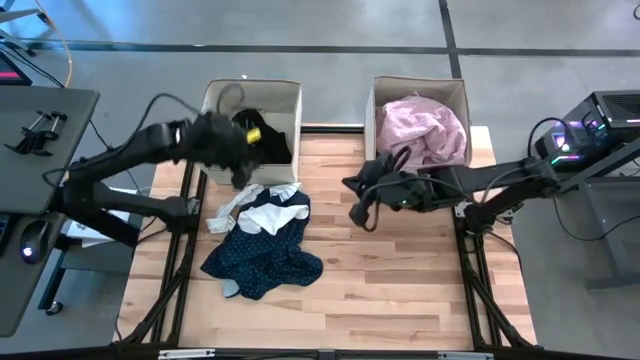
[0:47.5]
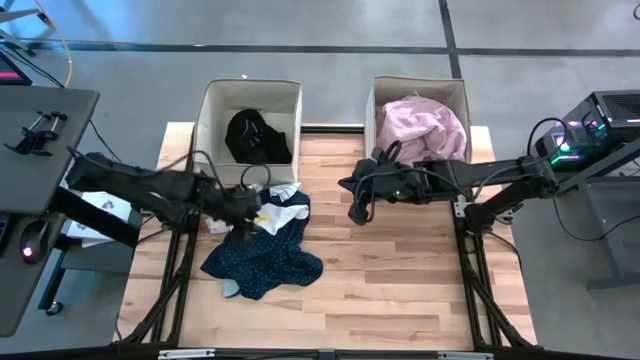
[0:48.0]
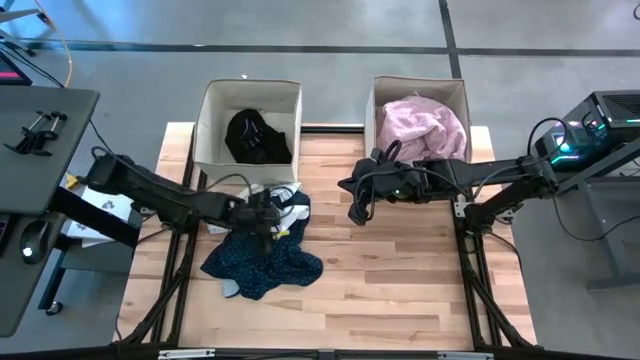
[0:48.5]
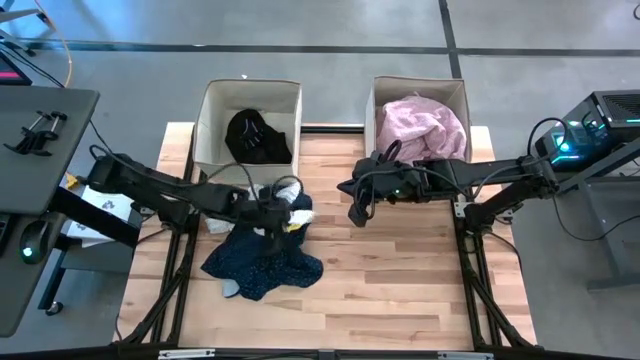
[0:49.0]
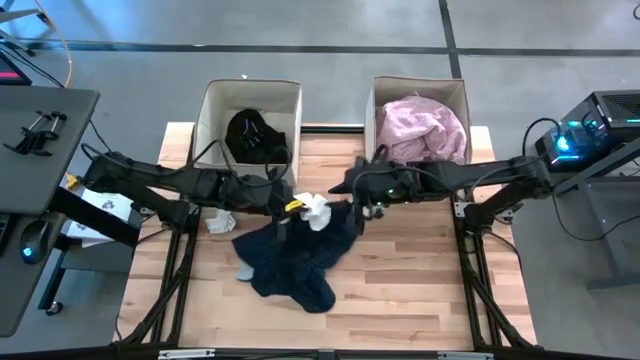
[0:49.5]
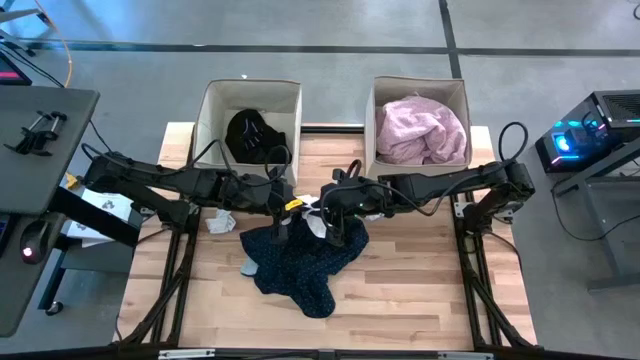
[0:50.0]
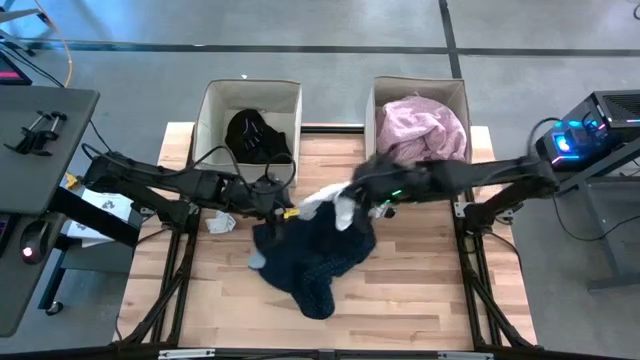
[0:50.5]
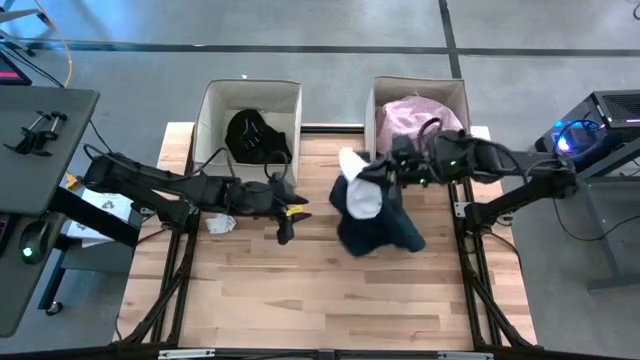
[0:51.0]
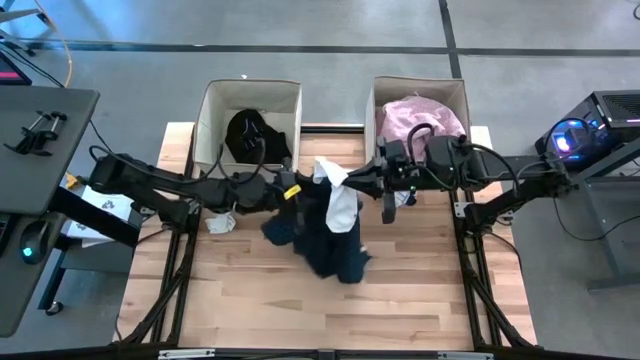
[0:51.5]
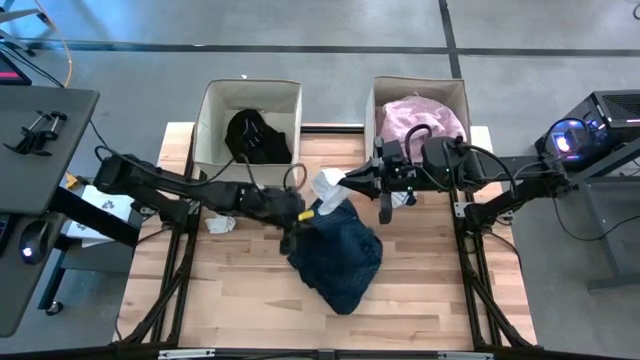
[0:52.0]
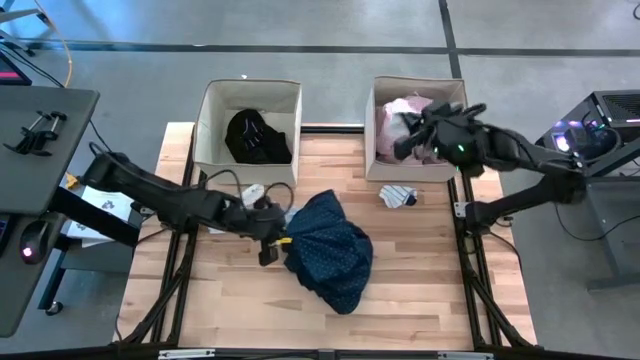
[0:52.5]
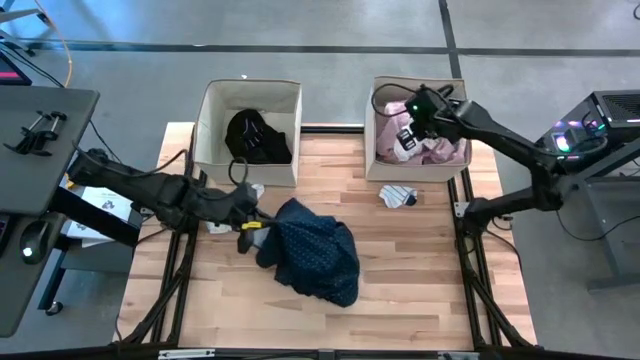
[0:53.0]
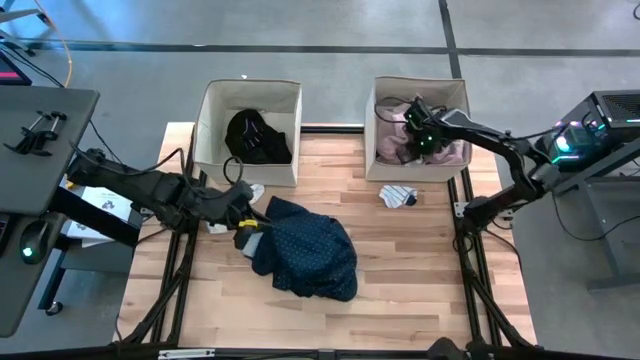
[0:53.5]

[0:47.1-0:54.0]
Task: Sort clothes
Put the white long sock into the top right laundry bin

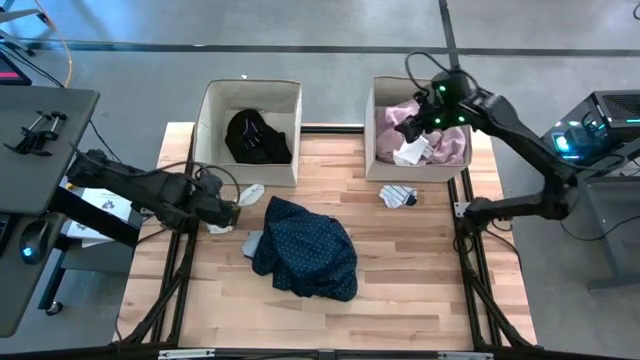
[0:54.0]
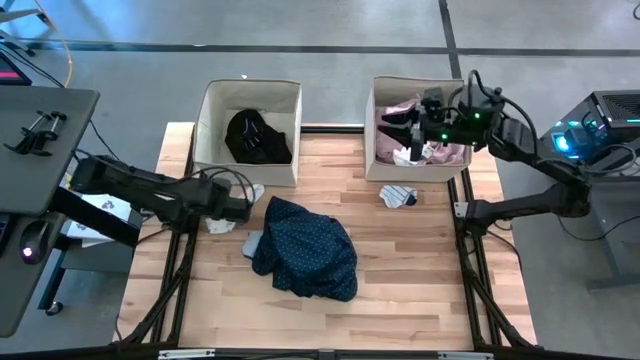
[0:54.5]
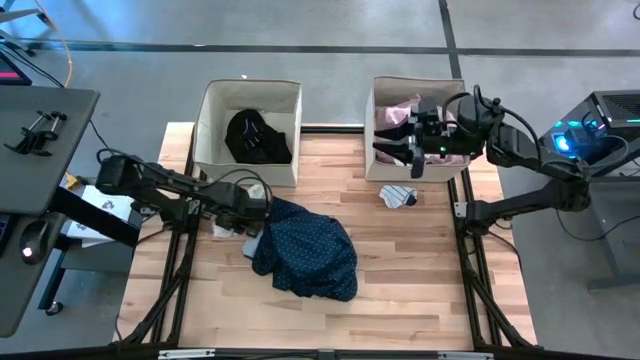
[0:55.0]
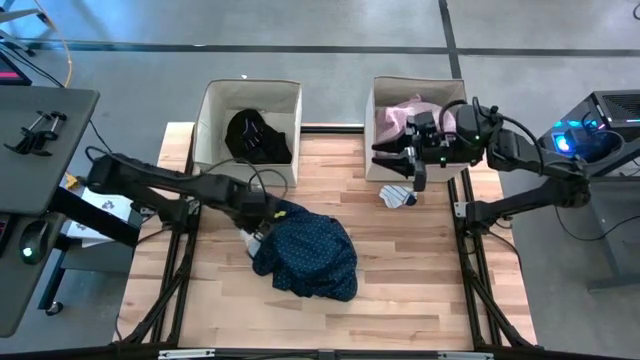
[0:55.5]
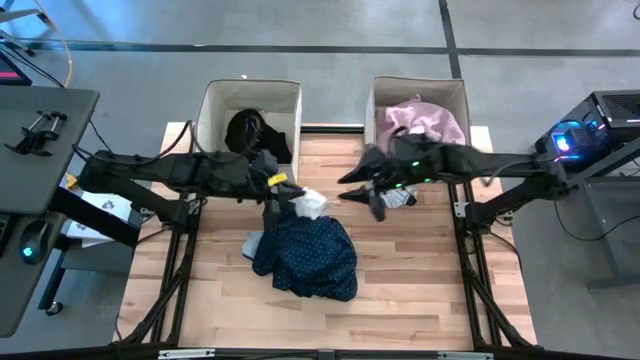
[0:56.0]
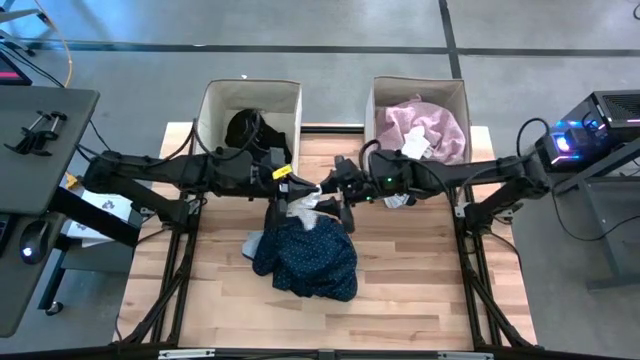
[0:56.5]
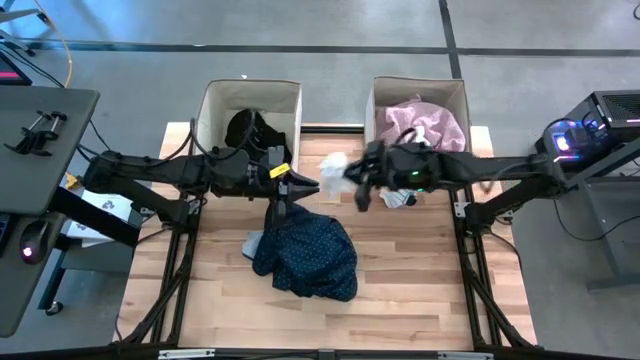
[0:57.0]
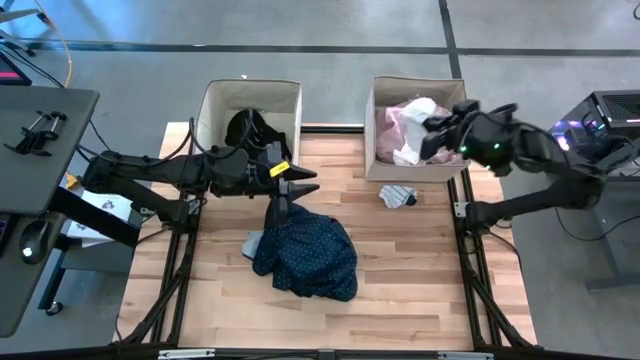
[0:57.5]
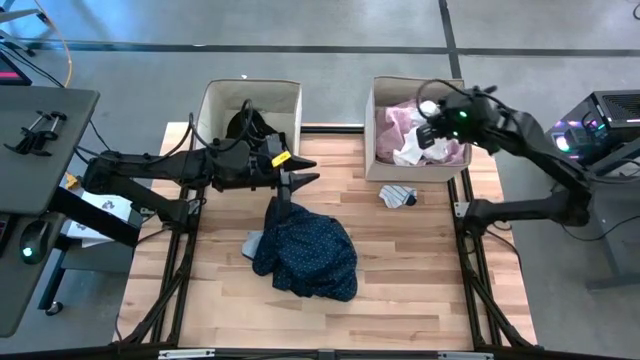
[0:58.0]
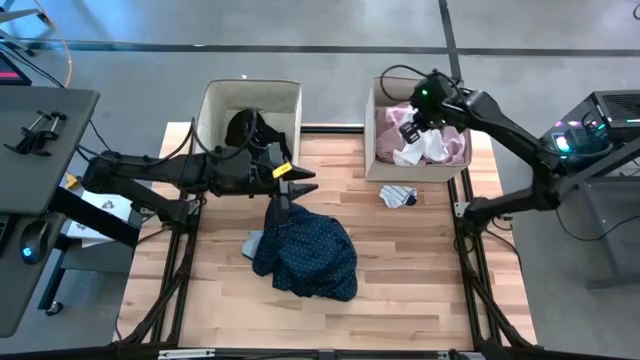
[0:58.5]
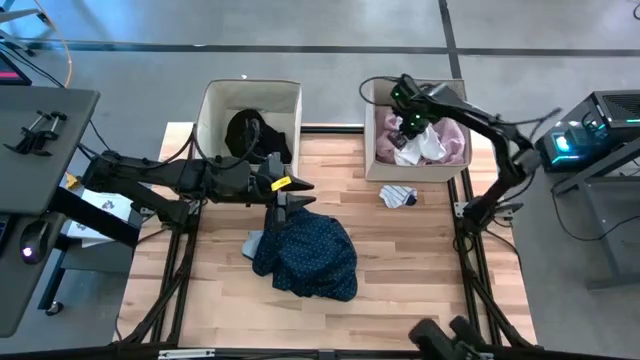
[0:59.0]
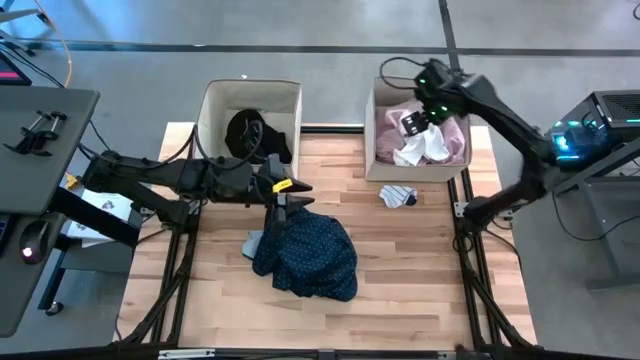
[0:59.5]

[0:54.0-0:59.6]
Put the white long sock into the top right laundry bin

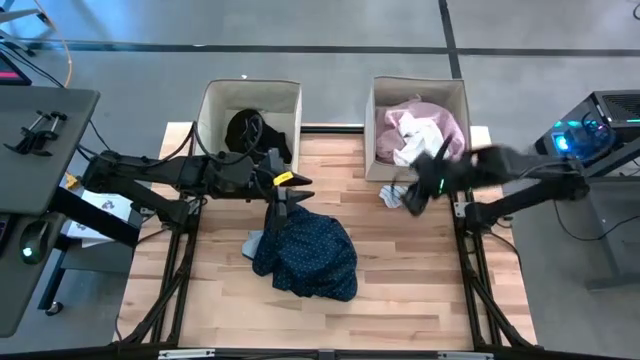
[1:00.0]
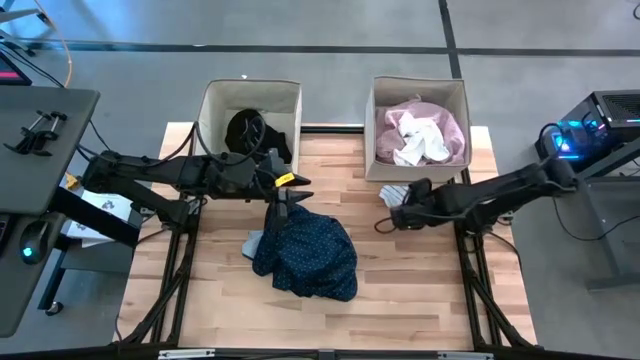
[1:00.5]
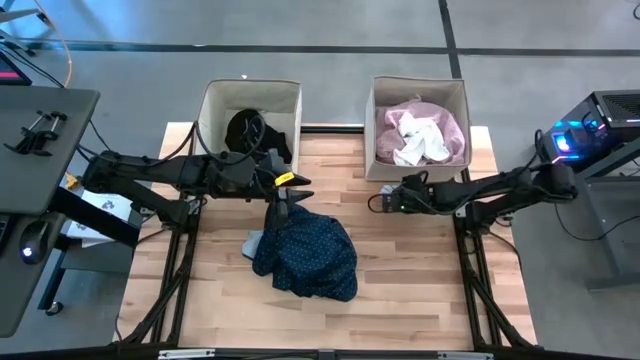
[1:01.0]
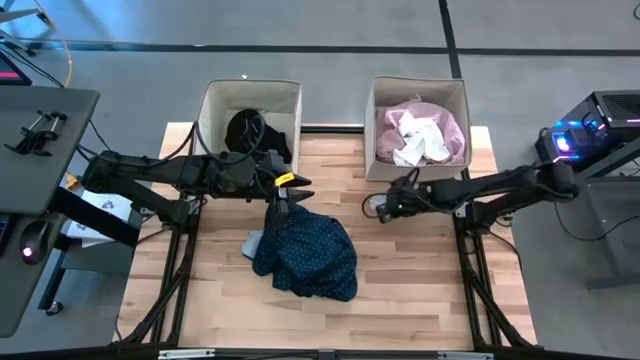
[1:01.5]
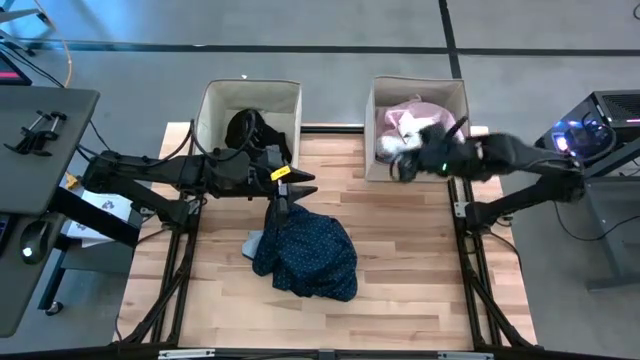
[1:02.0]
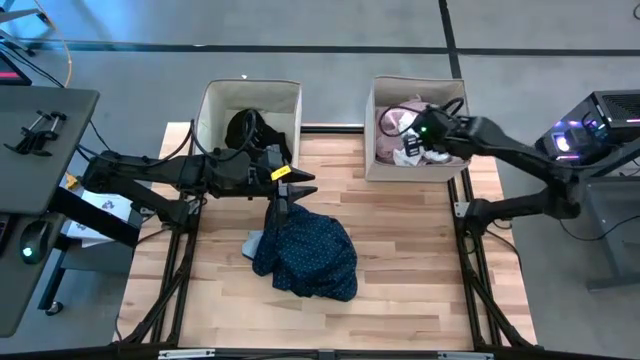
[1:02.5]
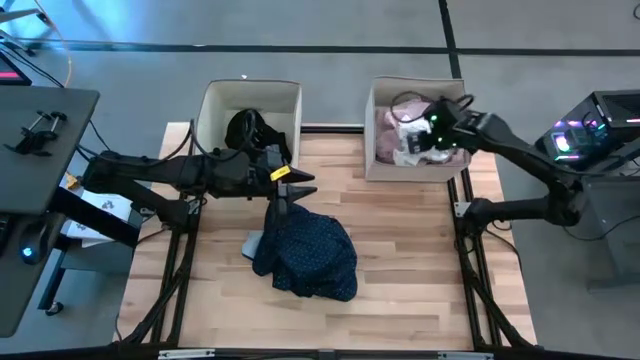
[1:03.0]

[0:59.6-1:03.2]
Put the white-blue sock into the top right laundry bin

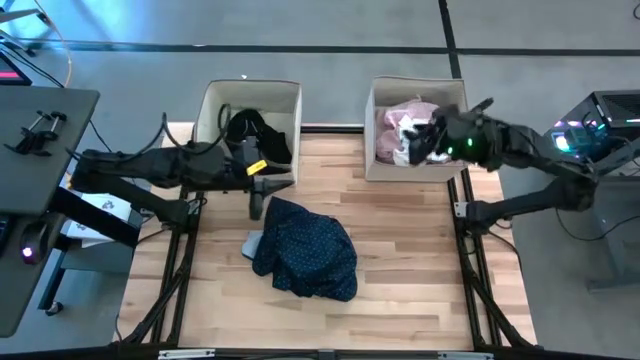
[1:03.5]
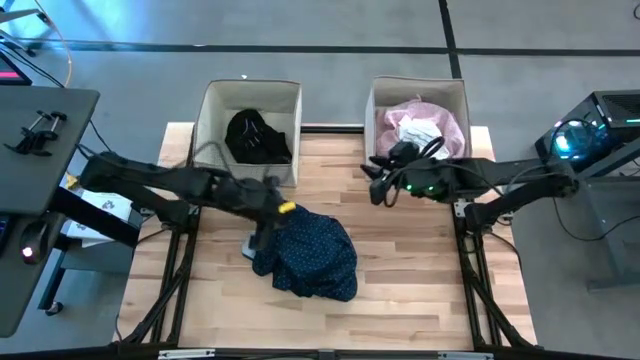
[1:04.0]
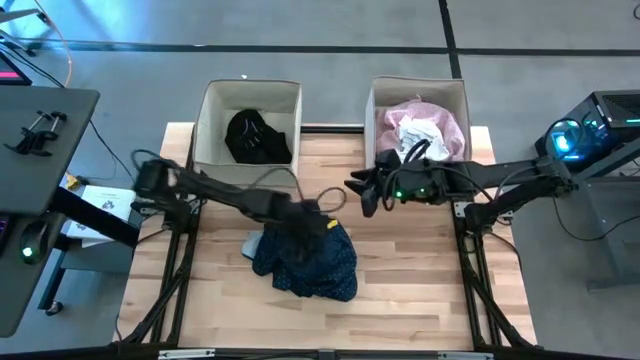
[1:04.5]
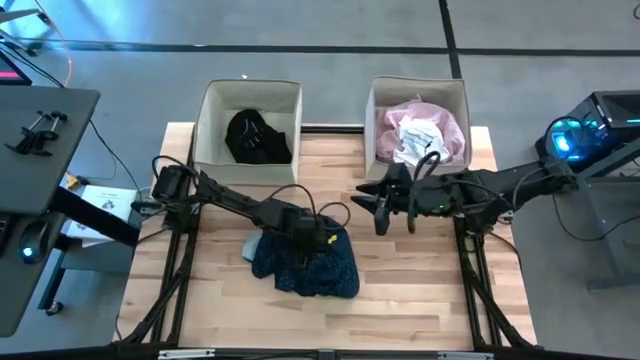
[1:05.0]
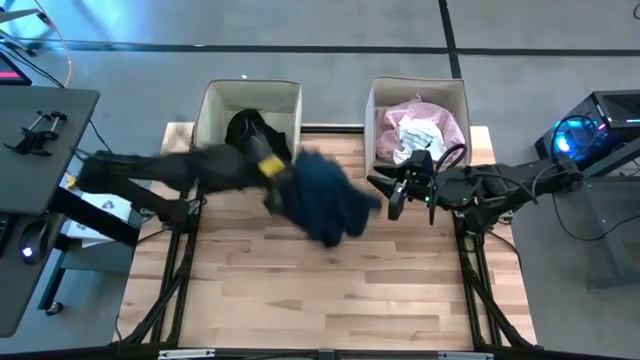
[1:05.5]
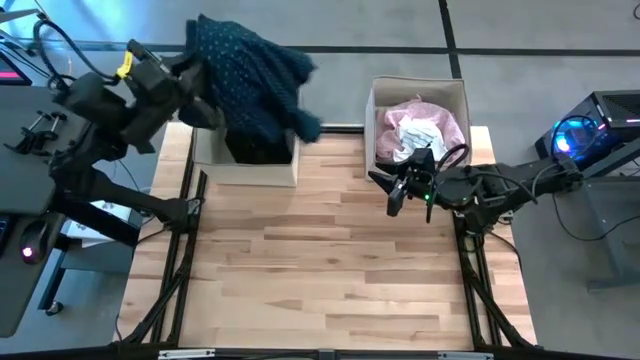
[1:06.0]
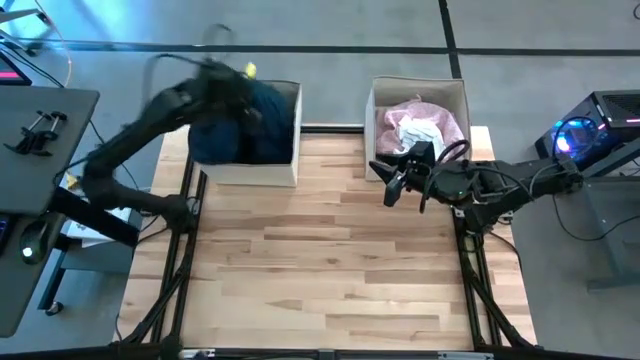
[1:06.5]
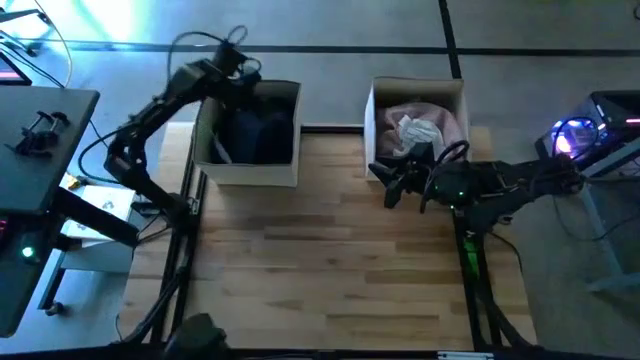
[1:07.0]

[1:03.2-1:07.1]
Put the dark blue dress into the top left laundry bin

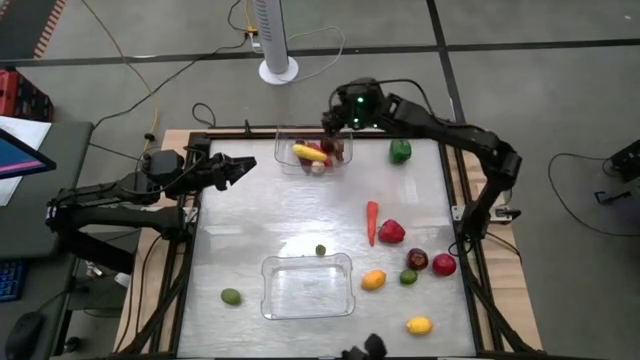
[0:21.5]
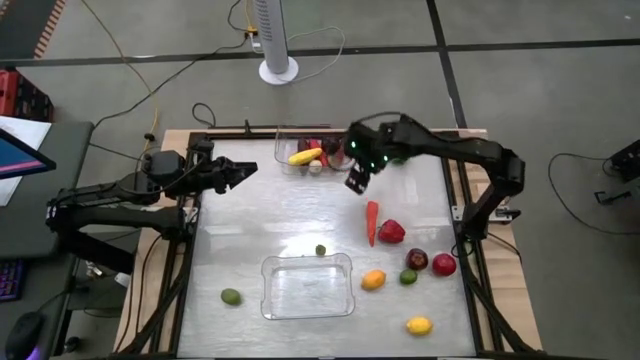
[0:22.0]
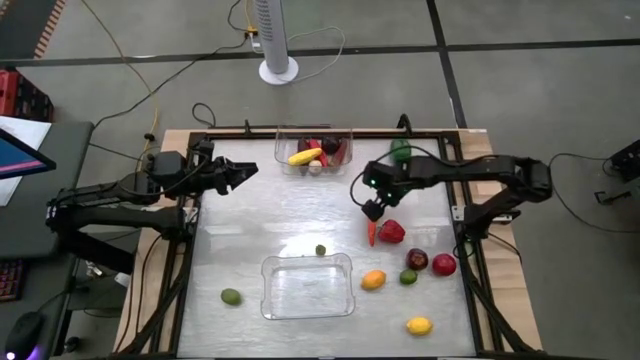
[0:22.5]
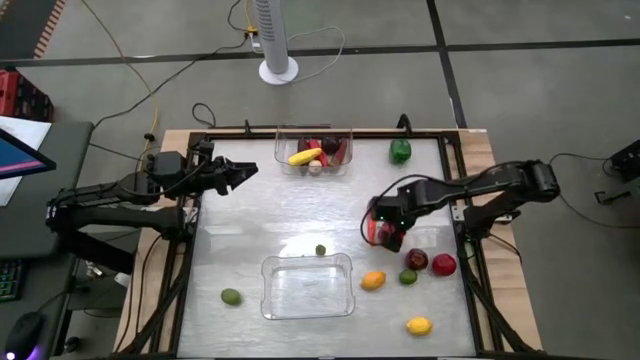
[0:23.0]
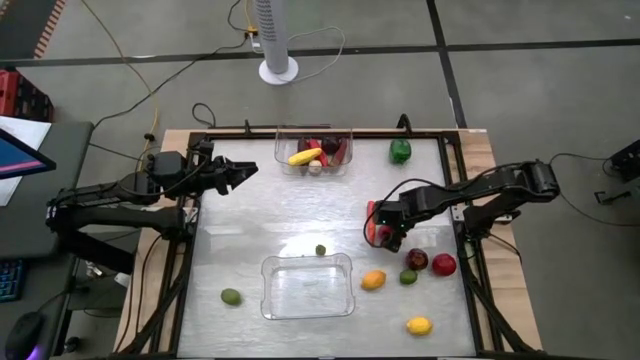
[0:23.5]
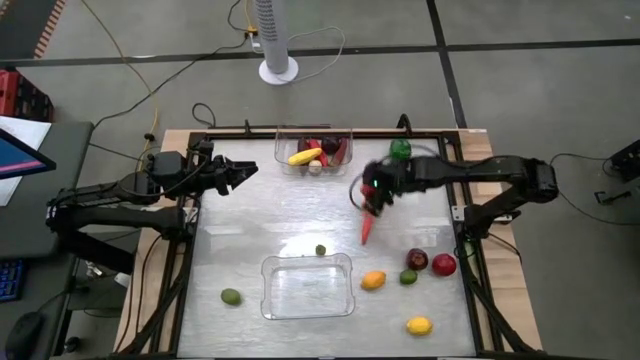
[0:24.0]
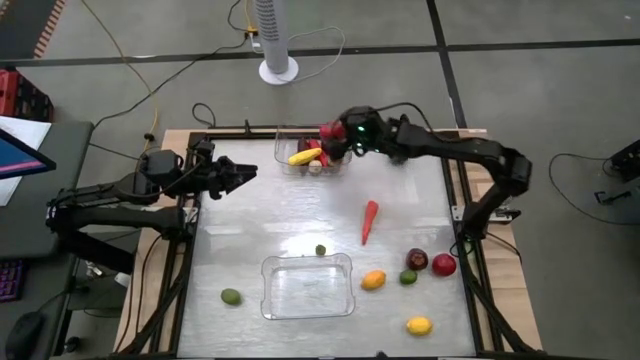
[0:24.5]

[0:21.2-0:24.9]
Task: Sort produce into baskets
Put the red bell pepper into the top transparent bin
